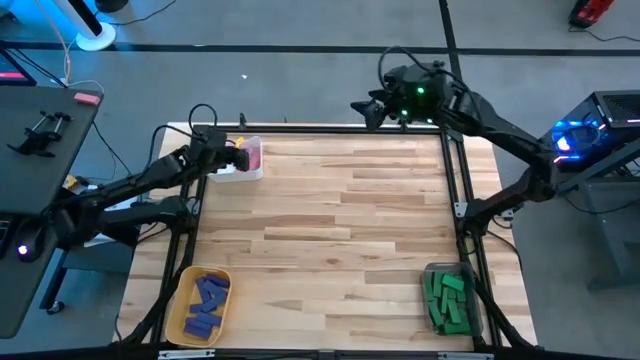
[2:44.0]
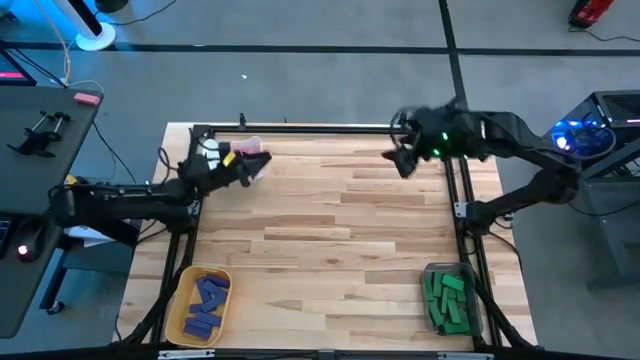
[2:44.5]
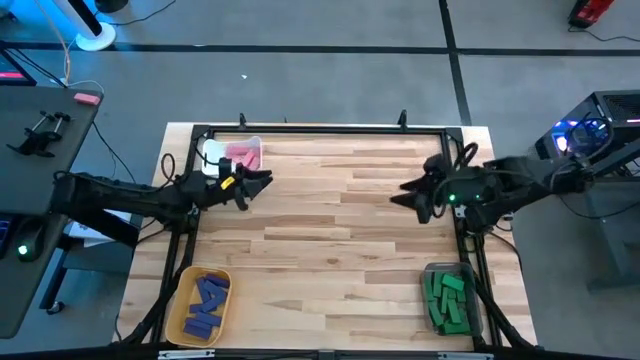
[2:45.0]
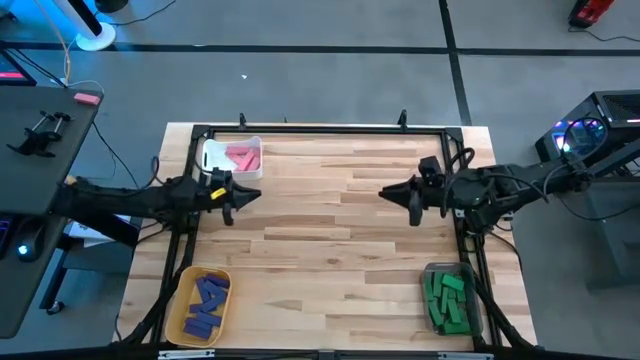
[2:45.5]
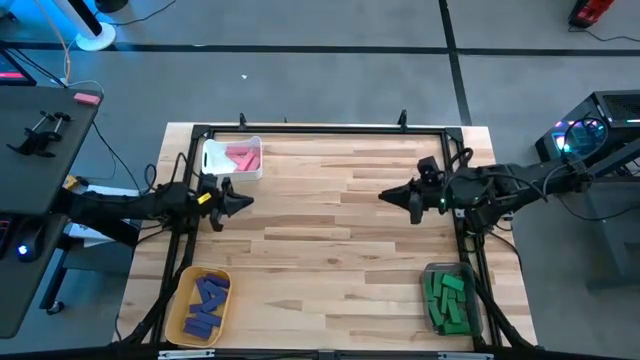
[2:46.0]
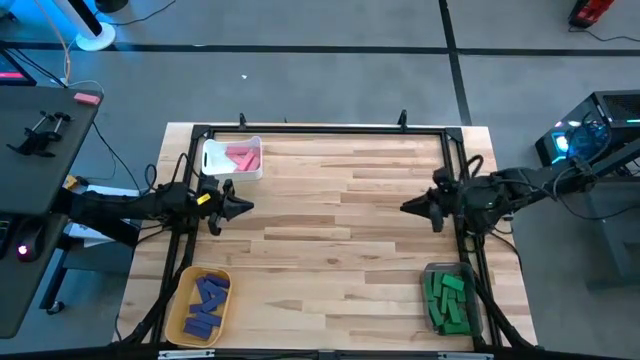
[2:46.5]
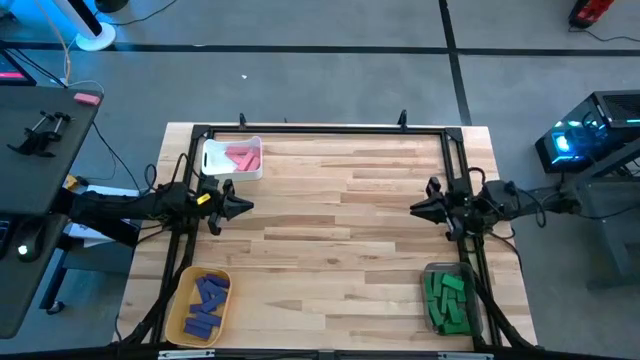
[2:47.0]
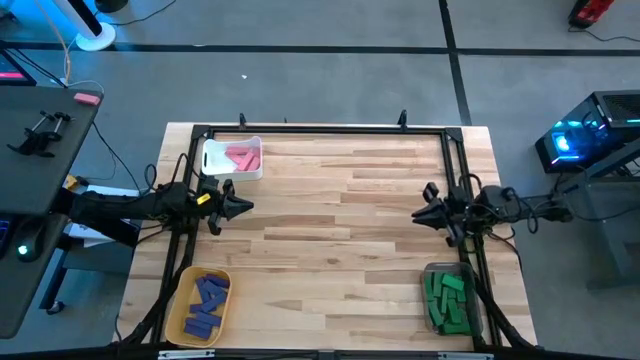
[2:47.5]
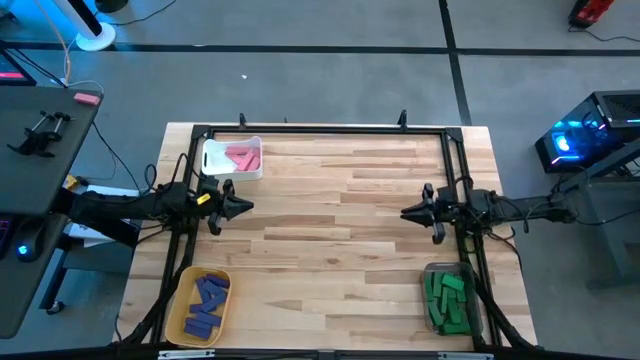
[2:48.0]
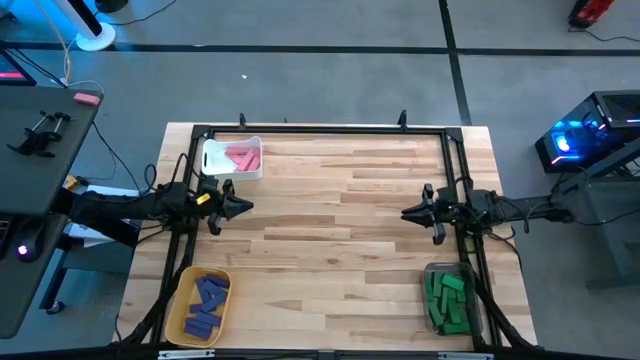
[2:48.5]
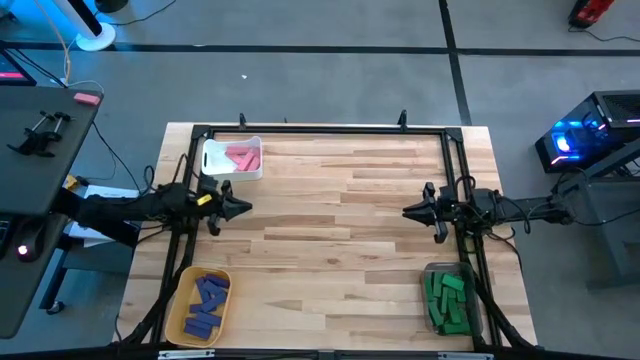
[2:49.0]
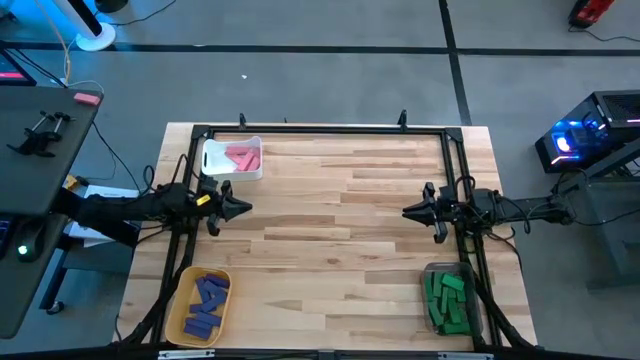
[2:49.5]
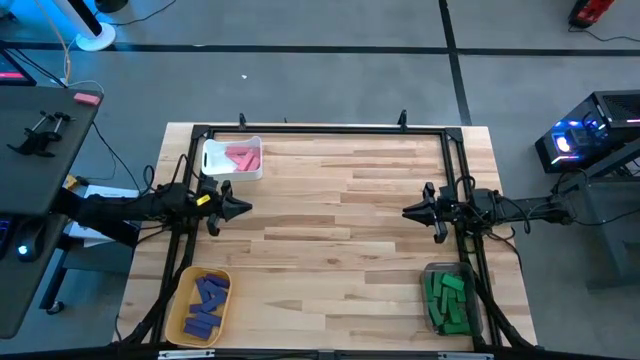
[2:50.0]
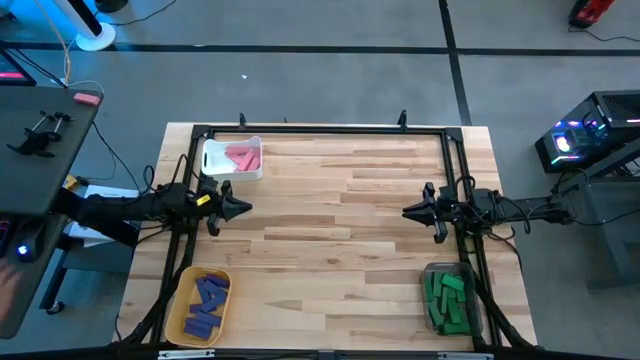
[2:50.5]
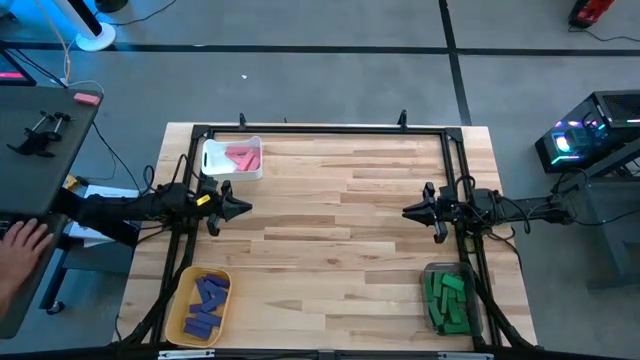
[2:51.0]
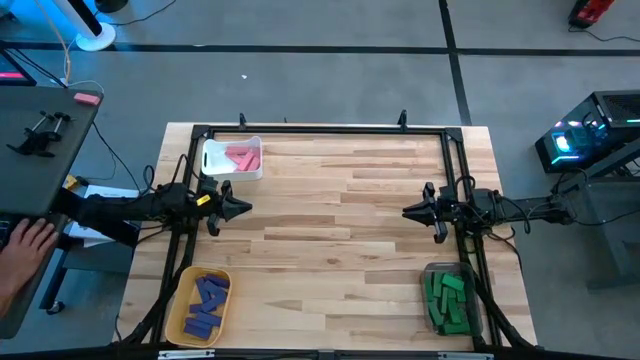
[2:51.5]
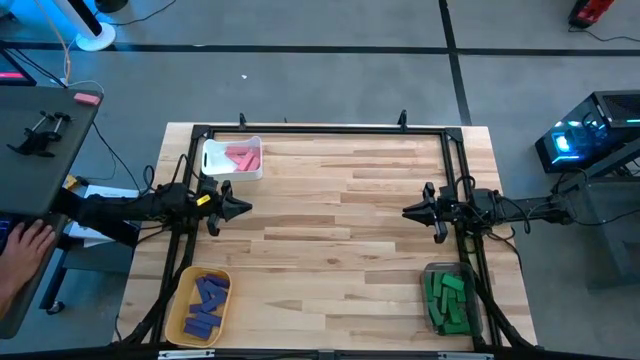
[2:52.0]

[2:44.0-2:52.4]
Task: Sort blocks
Return to Home Position

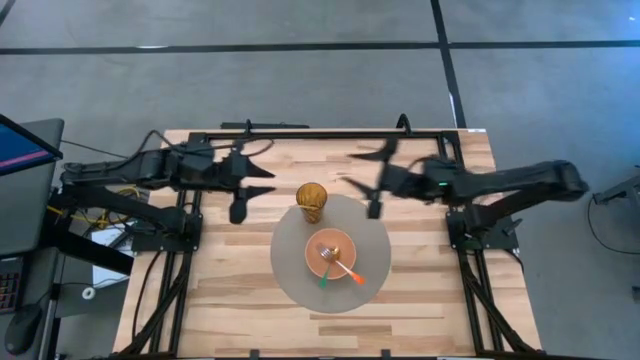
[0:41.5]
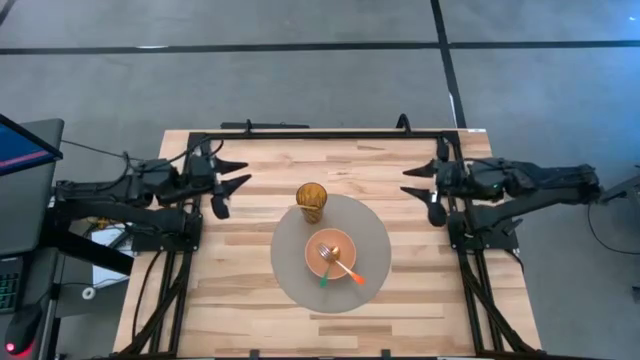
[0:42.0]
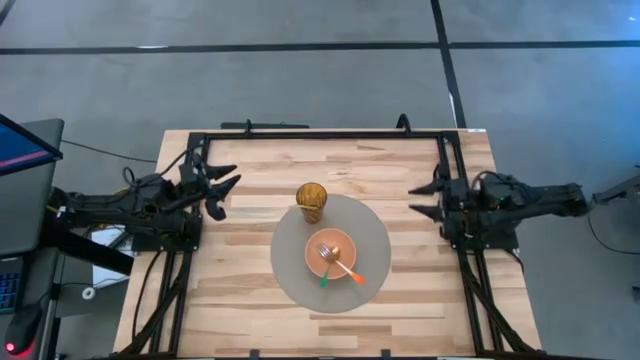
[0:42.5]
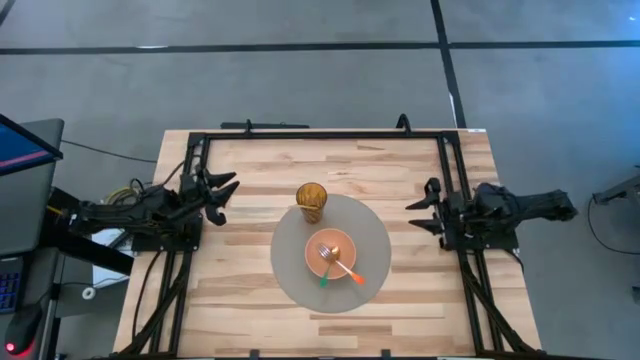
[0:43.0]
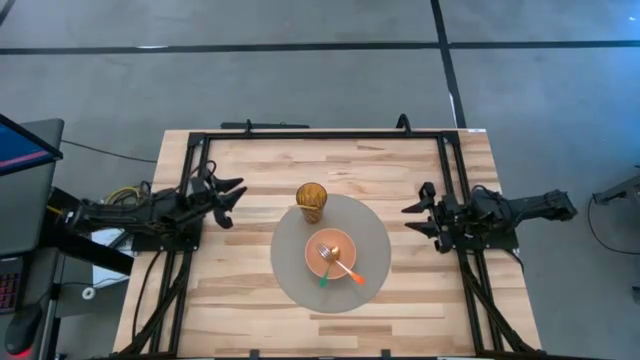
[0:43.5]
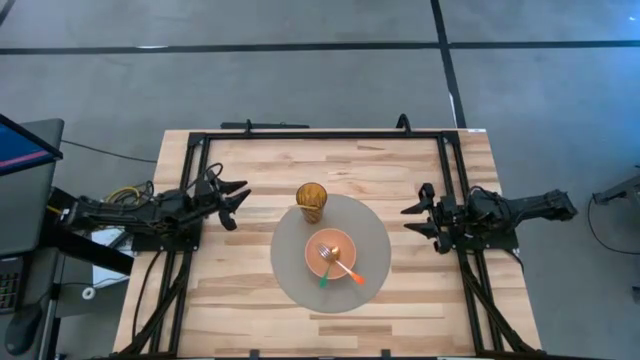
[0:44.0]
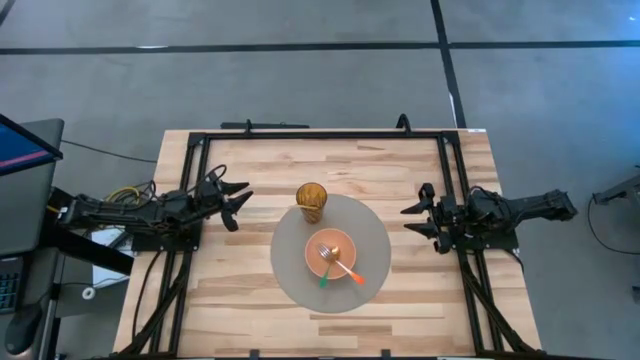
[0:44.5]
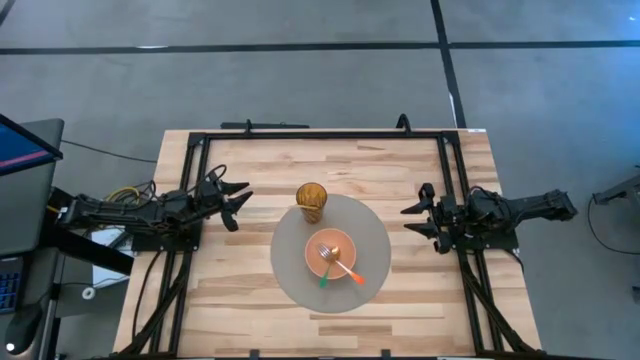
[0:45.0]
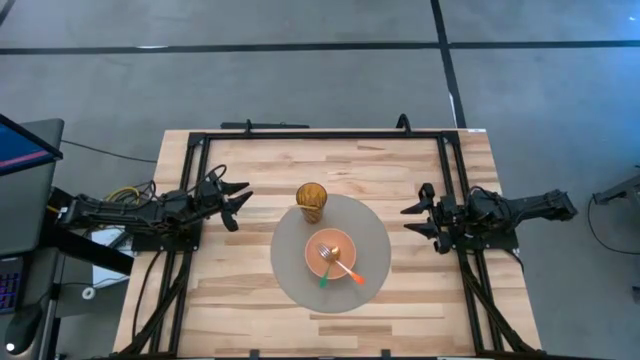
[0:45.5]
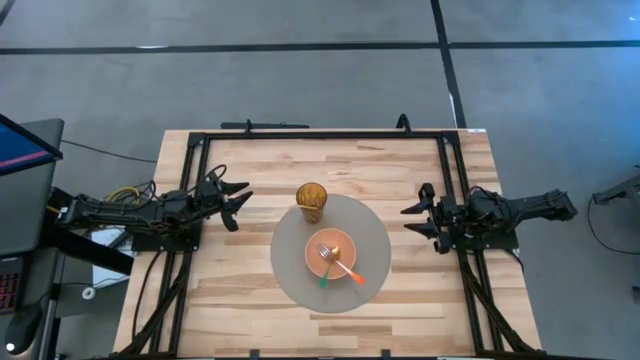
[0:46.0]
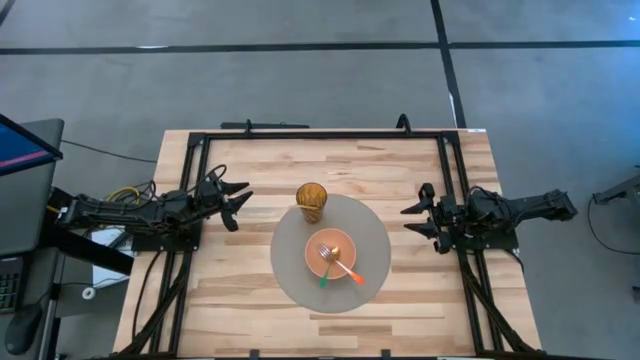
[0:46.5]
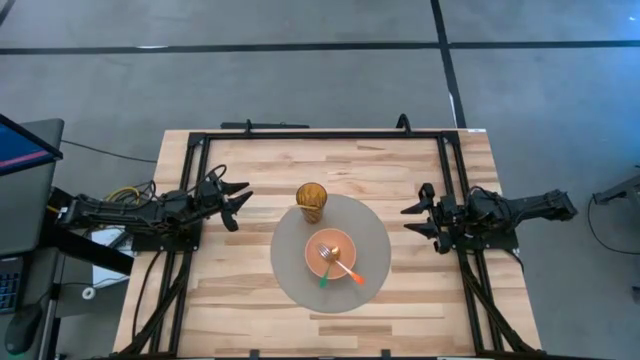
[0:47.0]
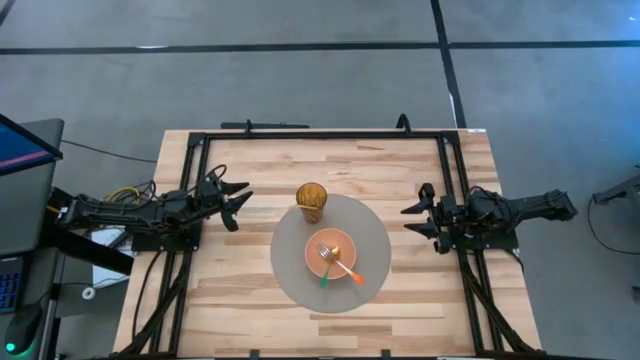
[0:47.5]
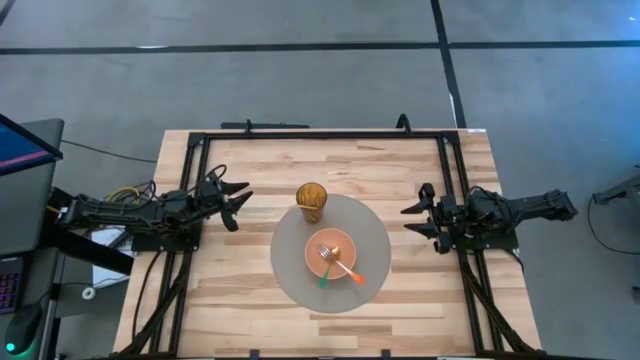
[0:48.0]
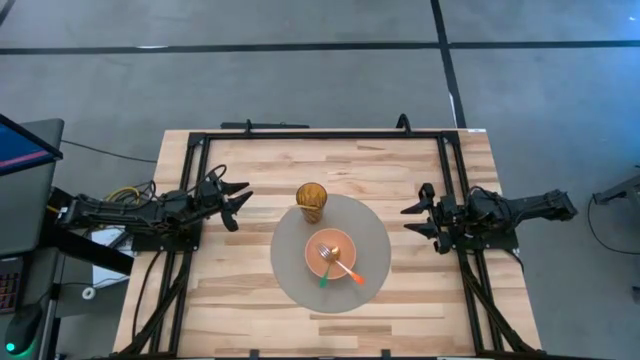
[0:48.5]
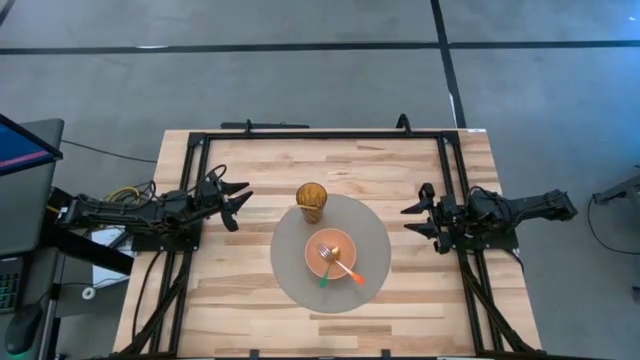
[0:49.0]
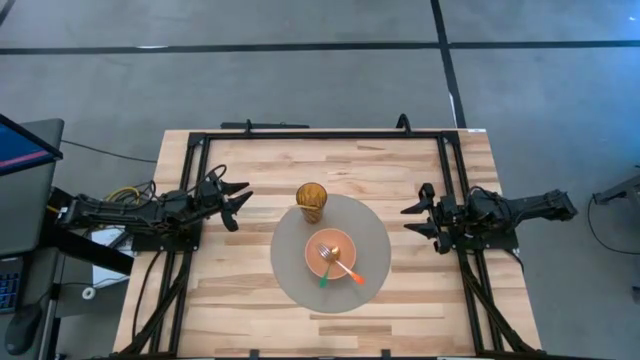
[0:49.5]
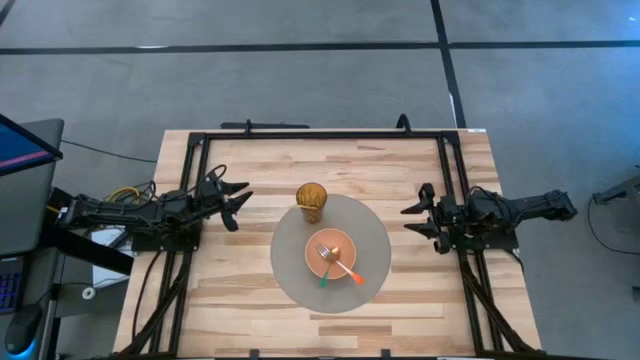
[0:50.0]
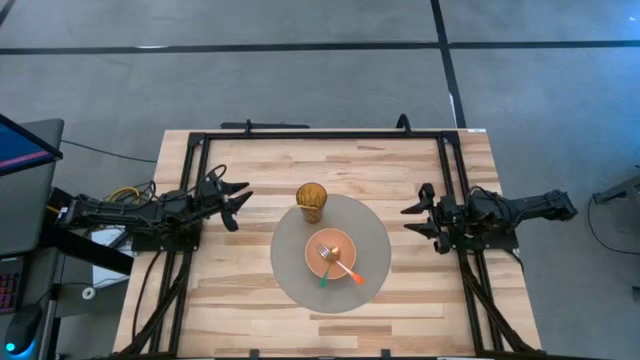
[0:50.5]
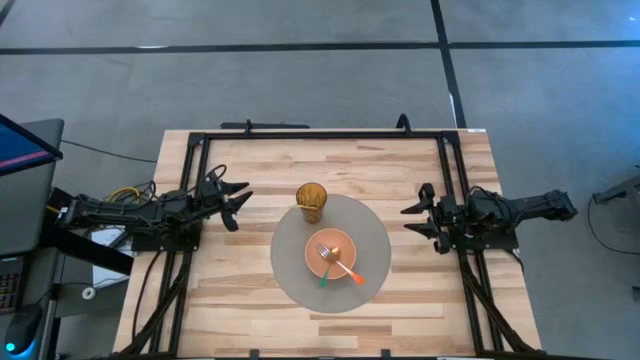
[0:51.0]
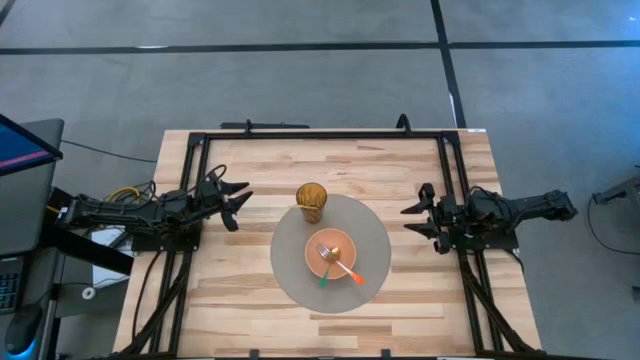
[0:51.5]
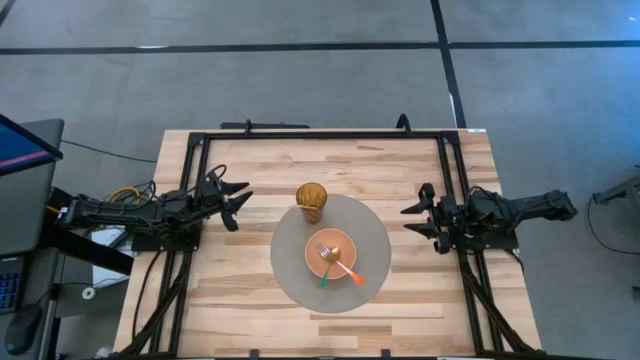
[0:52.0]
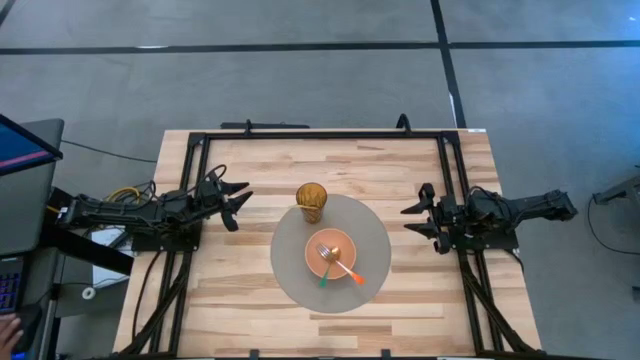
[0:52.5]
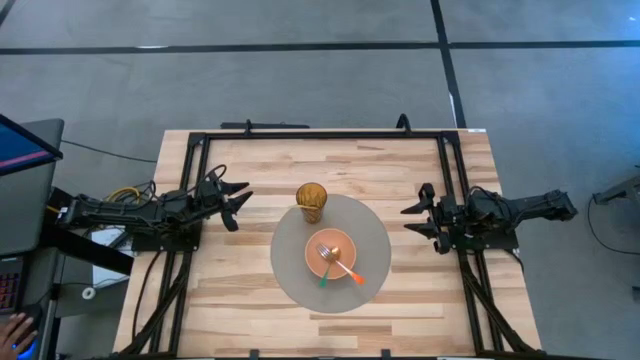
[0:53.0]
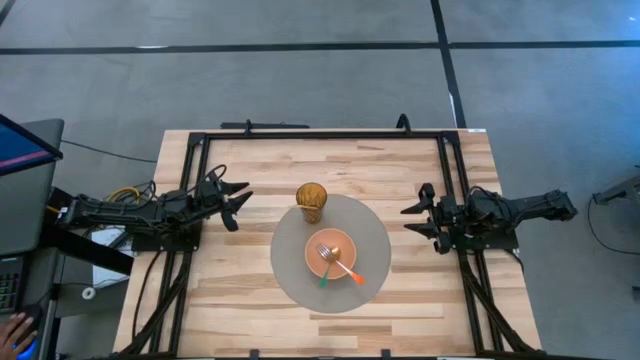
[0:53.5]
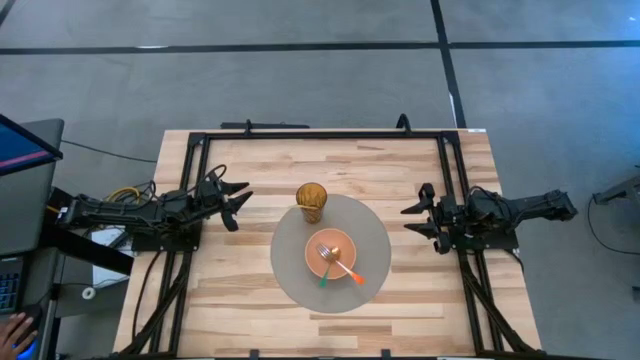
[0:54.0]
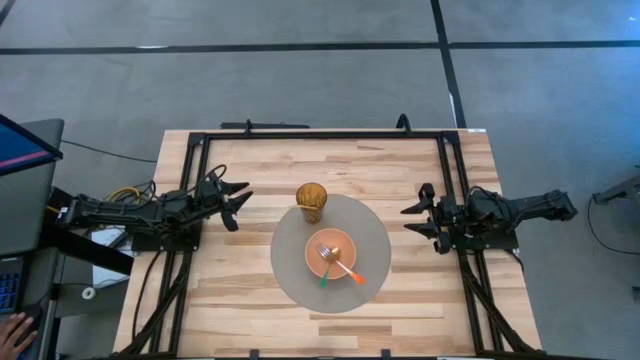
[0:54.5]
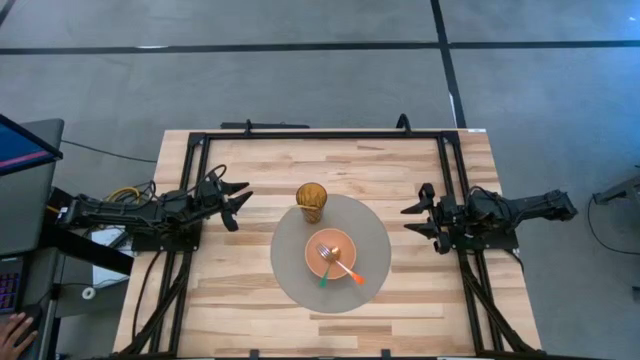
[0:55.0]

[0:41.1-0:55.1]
Task: Pick & Place Utensil
Return to Home Position
